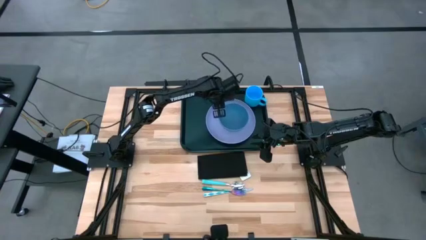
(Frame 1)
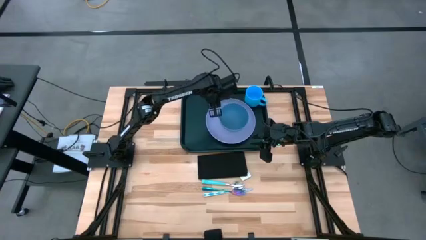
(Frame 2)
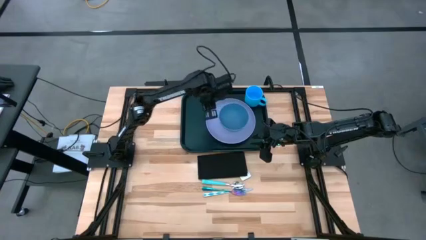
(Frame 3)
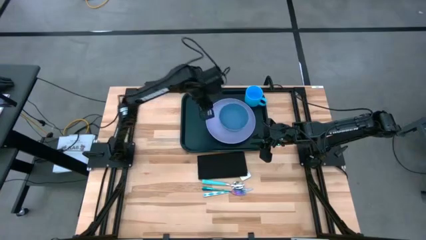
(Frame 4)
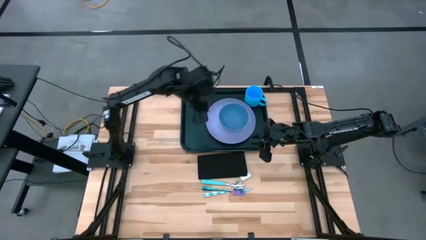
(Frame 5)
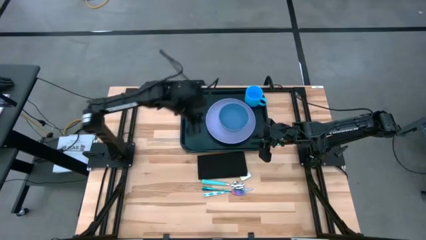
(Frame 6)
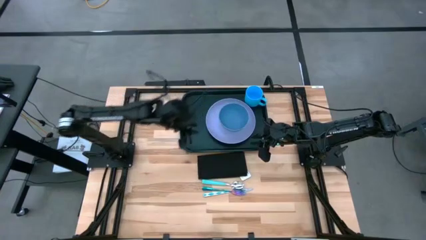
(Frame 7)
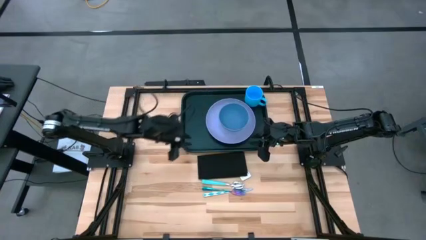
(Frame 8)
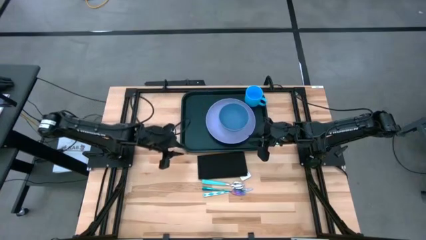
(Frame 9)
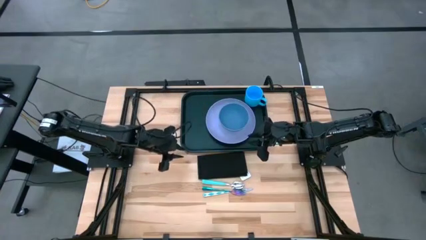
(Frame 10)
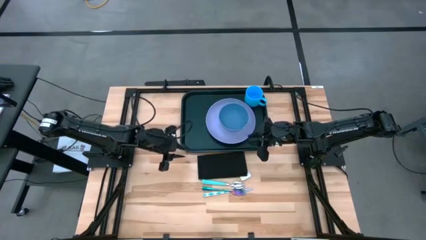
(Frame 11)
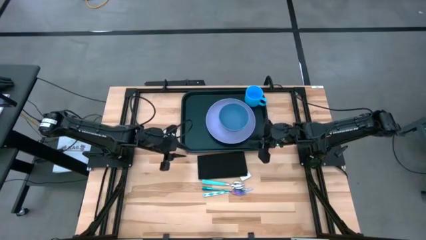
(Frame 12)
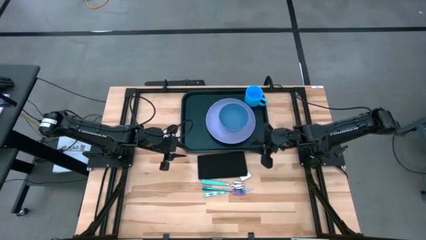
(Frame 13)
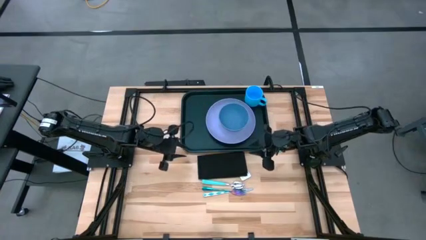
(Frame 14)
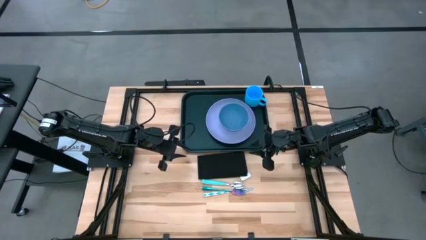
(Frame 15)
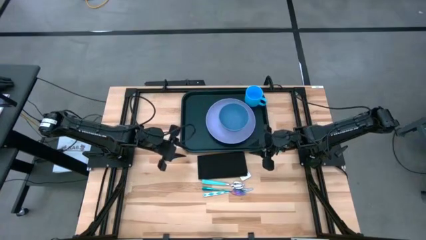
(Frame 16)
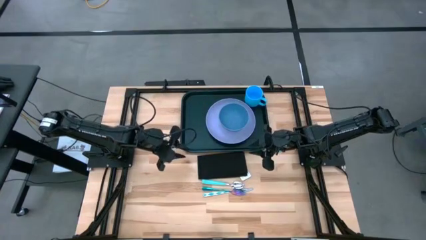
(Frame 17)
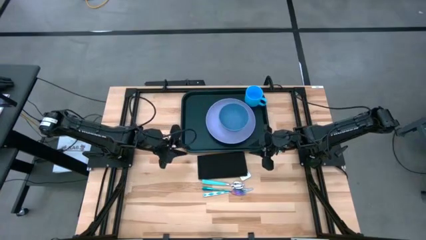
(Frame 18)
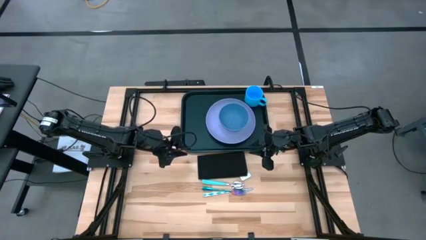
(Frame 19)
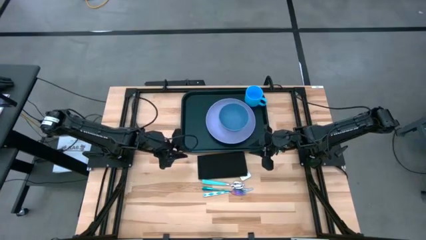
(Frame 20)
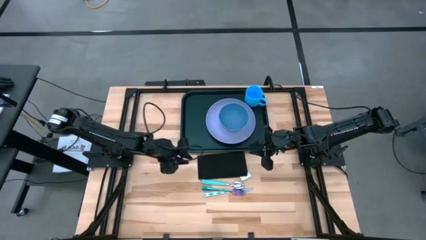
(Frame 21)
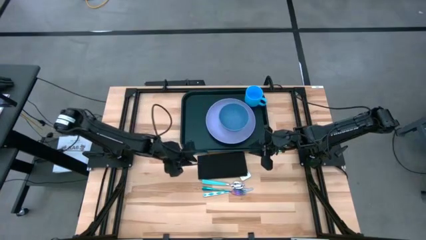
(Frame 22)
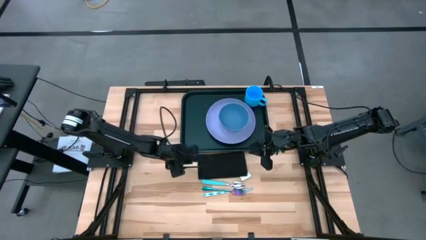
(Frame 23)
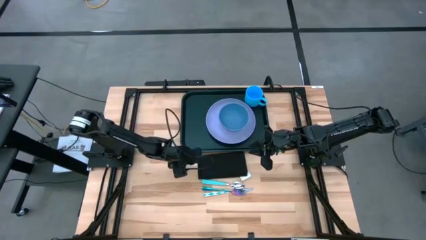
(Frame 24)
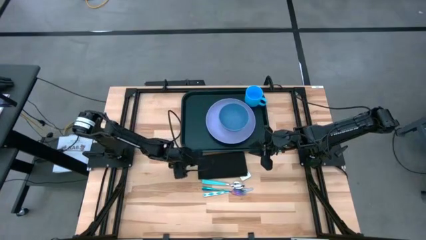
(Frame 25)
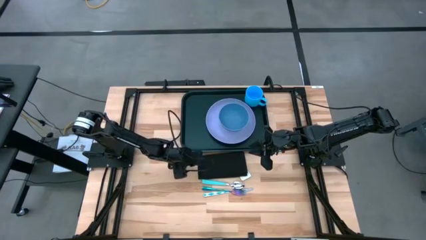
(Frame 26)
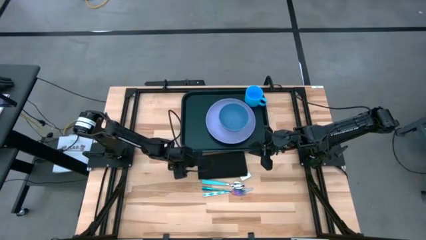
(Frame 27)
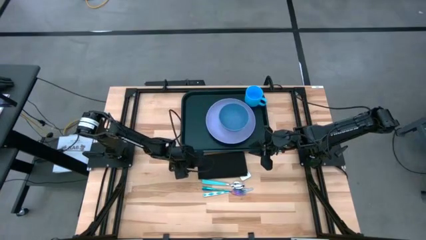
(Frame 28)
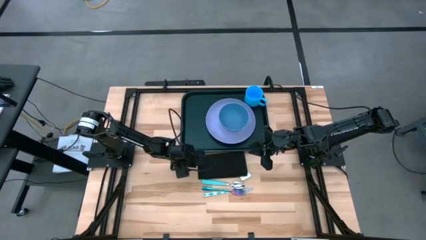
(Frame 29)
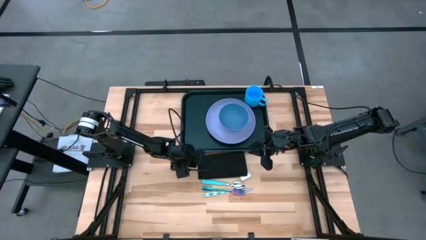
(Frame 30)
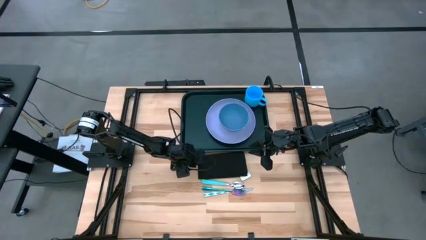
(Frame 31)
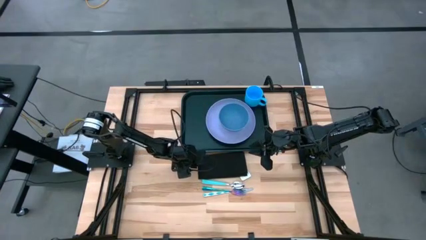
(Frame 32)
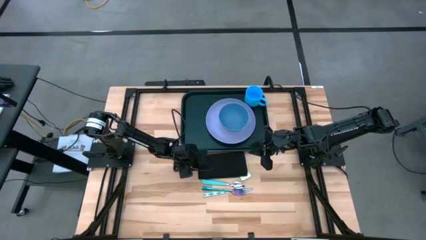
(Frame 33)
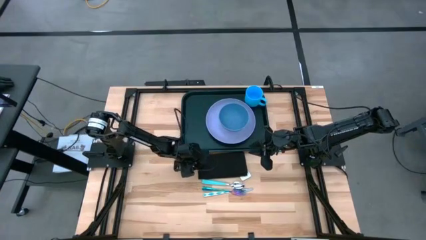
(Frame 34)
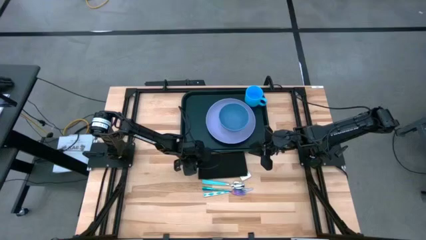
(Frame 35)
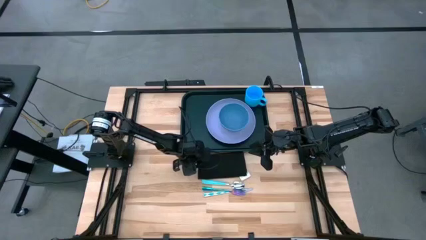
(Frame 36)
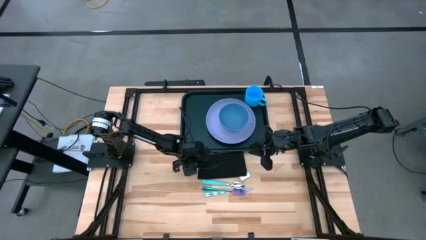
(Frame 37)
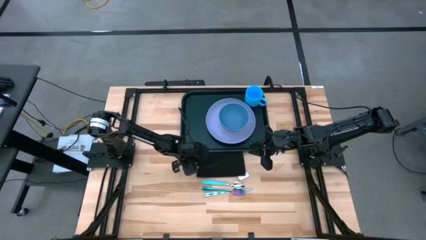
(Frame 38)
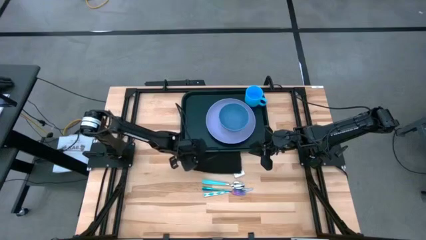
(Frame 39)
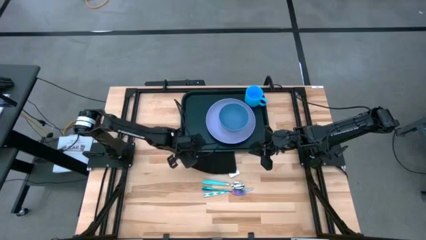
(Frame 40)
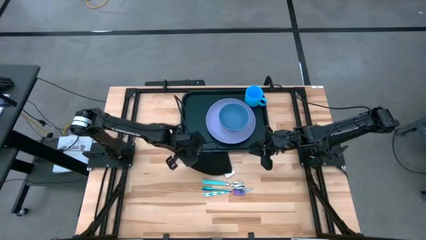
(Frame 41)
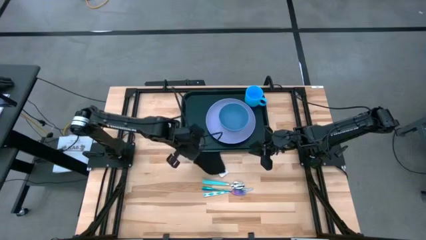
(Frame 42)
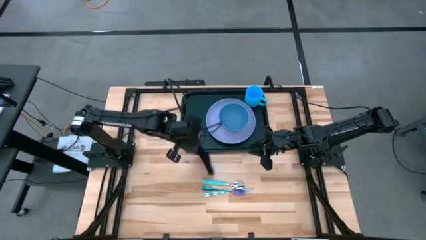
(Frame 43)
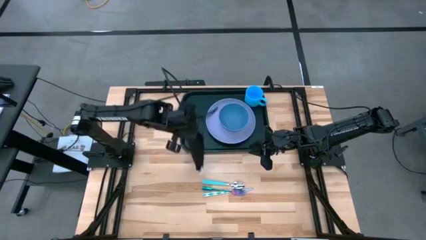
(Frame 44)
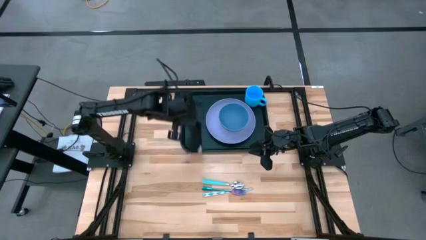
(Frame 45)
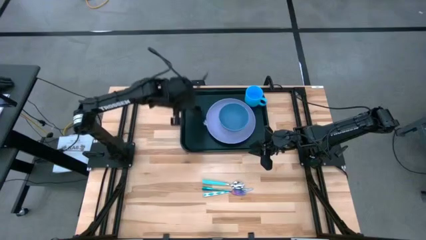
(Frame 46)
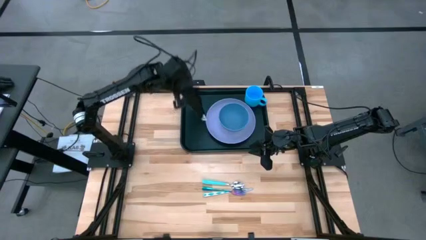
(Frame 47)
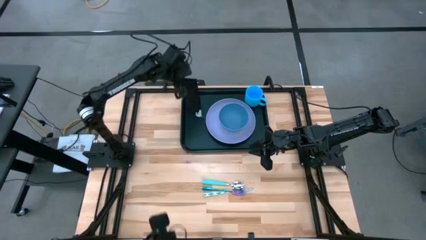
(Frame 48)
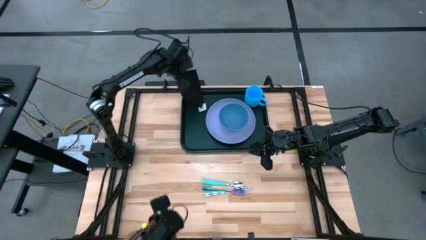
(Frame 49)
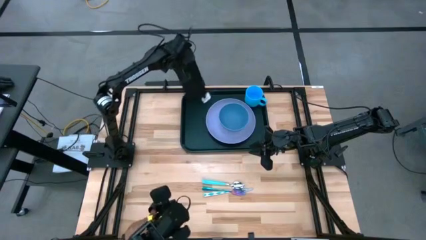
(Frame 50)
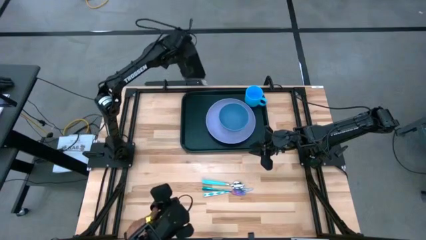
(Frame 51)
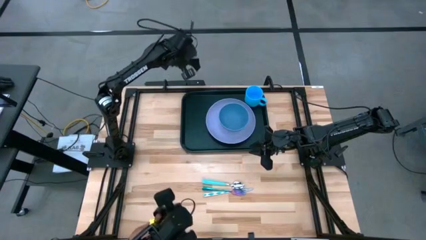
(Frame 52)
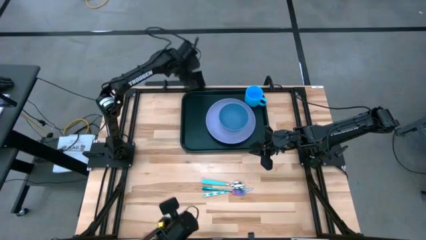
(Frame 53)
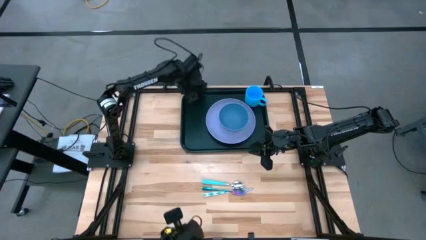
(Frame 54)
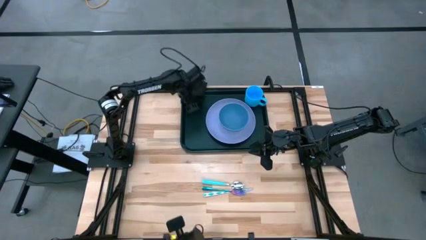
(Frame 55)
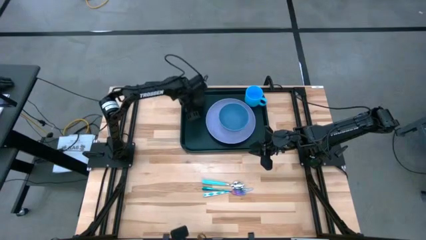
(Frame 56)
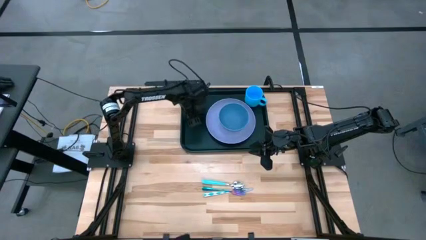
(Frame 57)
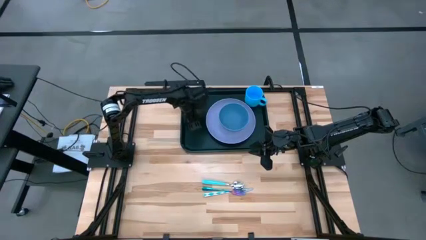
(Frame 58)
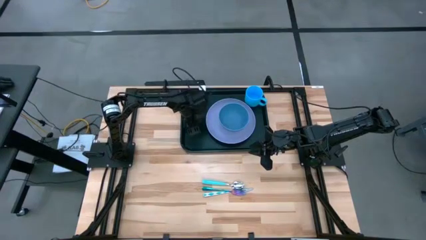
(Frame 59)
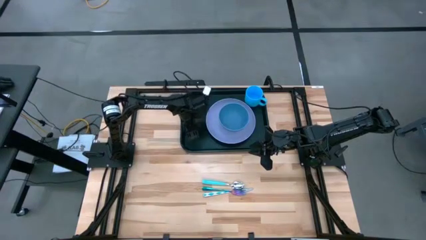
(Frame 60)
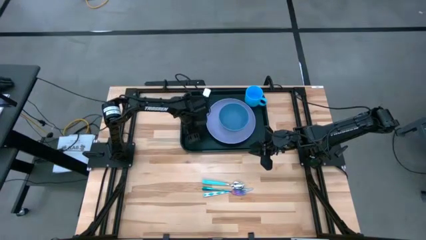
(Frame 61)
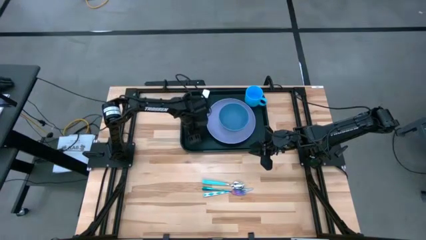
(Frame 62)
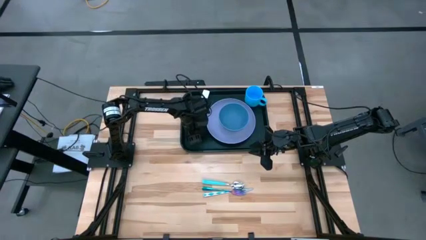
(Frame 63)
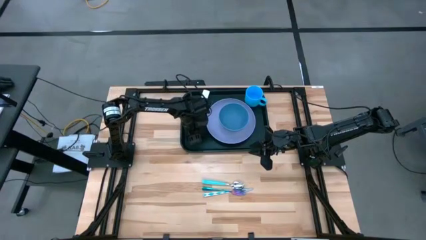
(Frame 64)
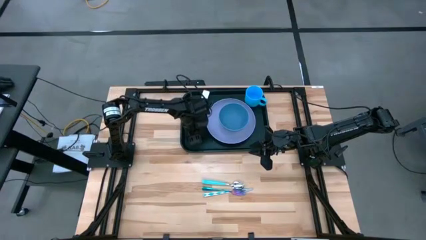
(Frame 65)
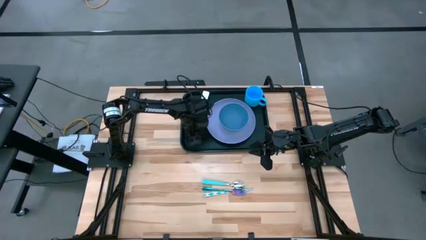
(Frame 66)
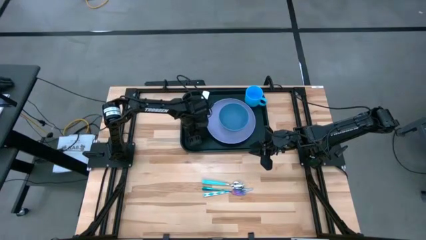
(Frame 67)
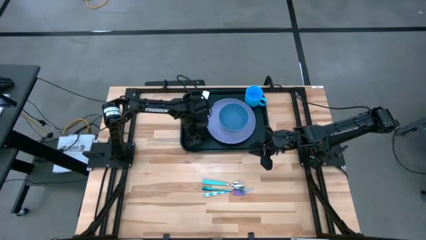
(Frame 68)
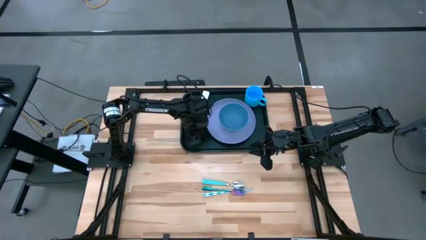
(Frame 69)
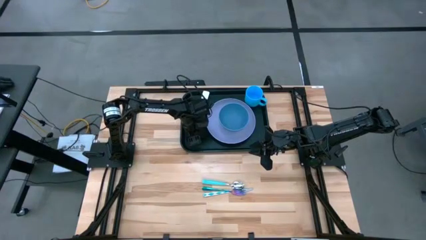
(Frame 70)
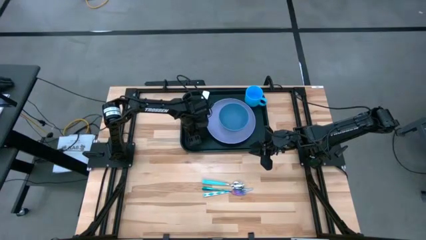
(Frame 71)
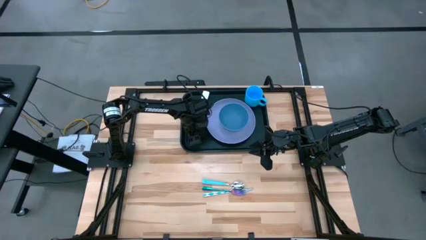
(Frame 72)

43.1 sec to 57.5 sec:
Task: Set up tray
Put the black napkin to the left of the violet plate on the black tray

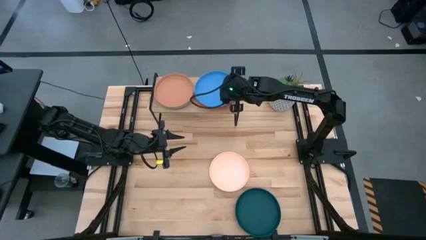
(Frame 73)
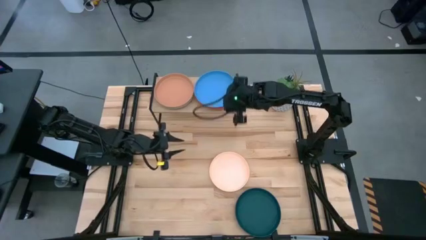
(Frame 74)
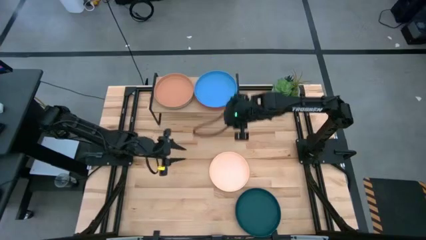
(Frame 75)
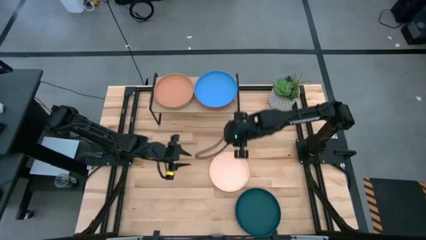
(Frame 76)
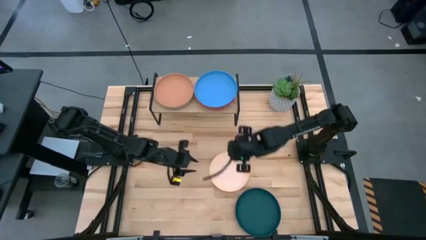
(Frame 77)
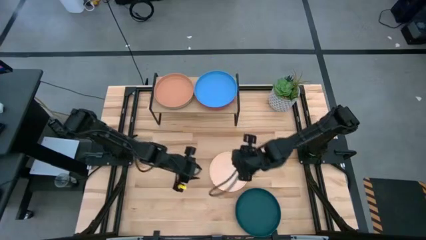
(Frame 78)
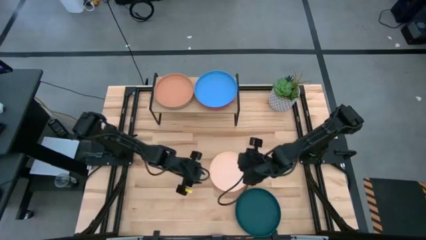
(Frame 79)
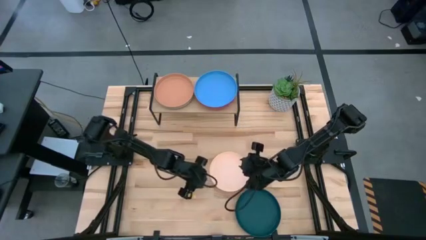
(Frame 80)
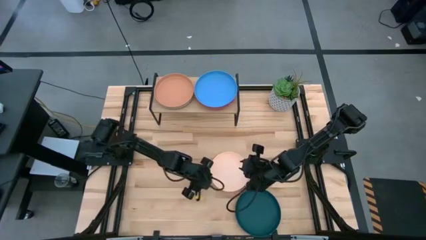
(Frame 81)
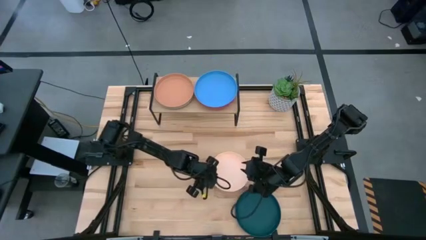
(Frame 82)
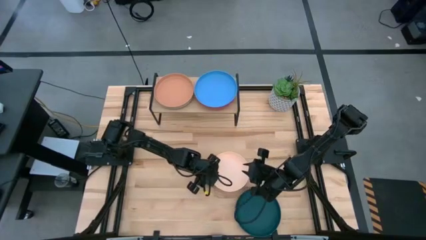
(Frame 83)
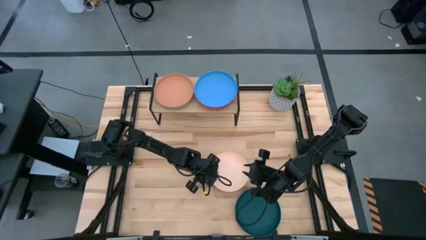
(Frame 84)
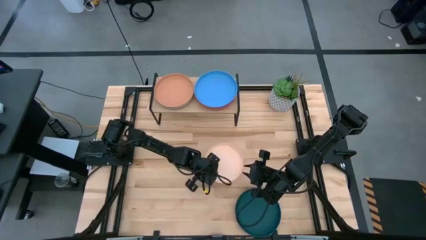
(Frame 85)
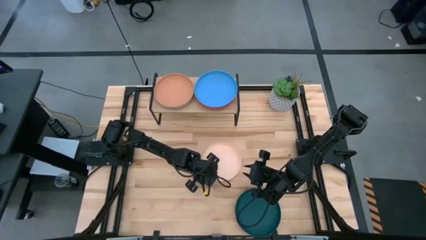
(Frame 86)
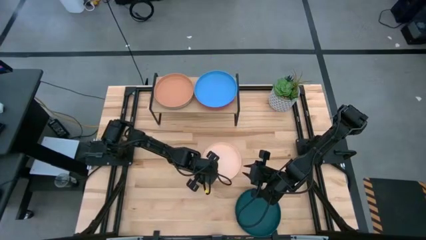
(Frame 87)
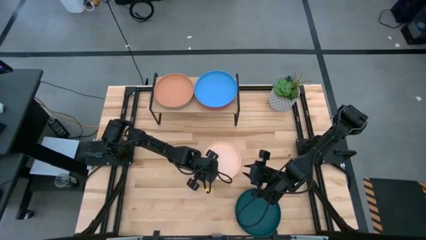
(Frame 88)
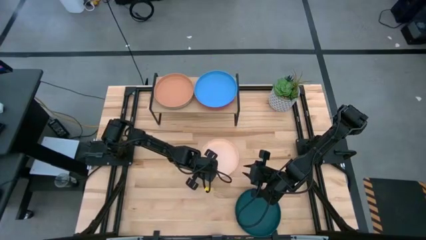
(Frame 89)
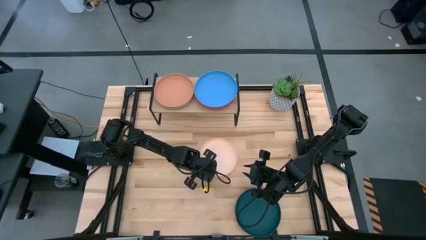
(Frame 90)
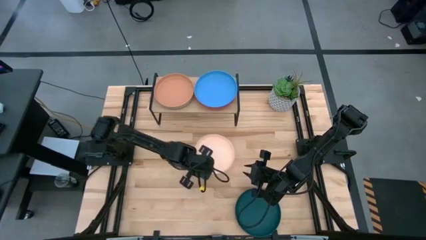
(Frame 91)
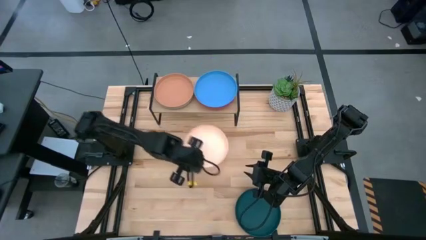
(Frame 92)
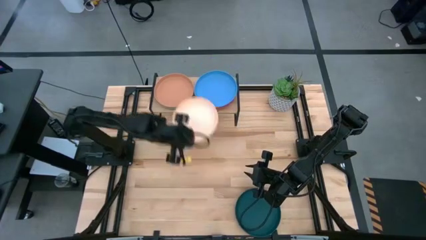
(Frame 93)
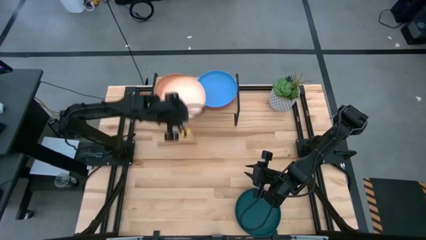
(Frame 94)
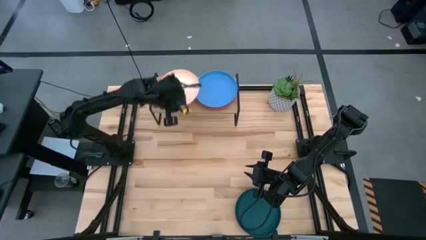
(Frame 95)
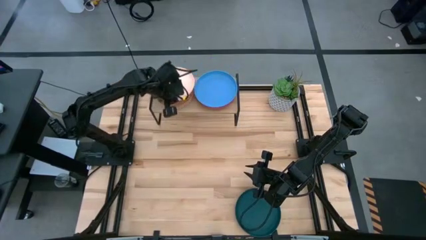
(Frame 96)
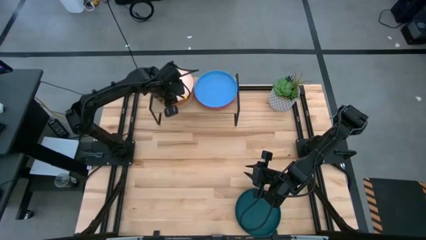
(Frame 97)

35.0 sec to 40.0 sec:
Task: Place and stack plates onto a shelf
Stack the light orange plate on top of the brown plate on the shelf
